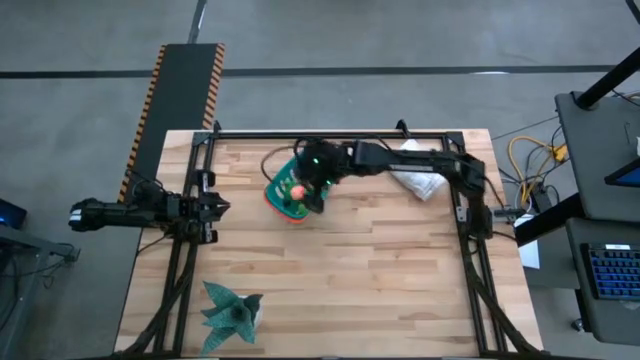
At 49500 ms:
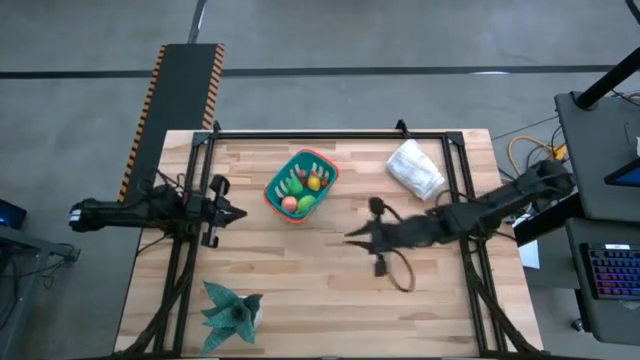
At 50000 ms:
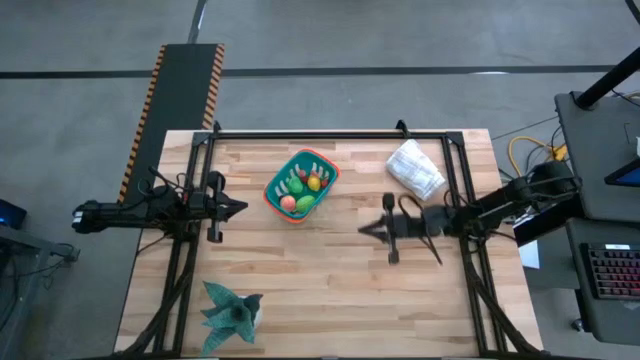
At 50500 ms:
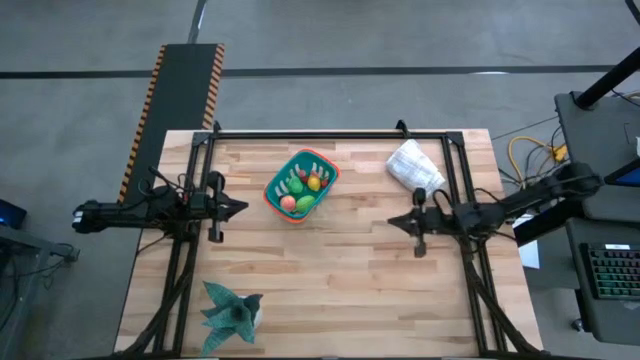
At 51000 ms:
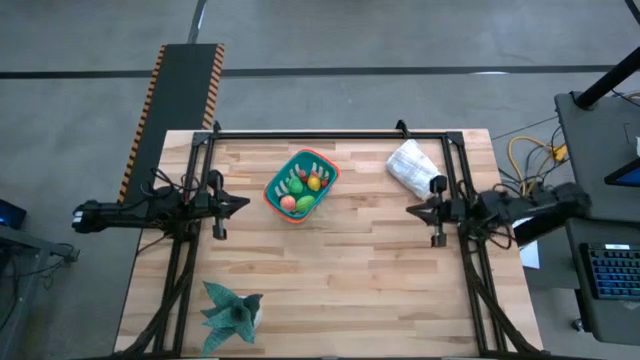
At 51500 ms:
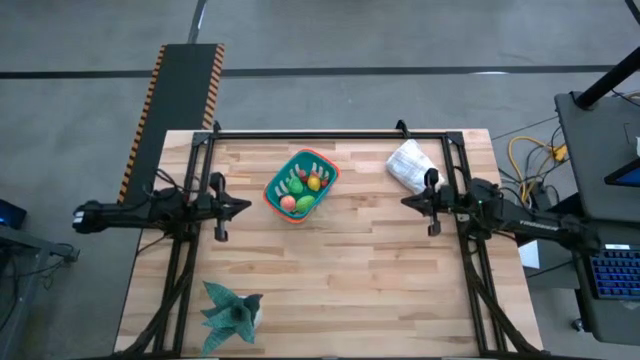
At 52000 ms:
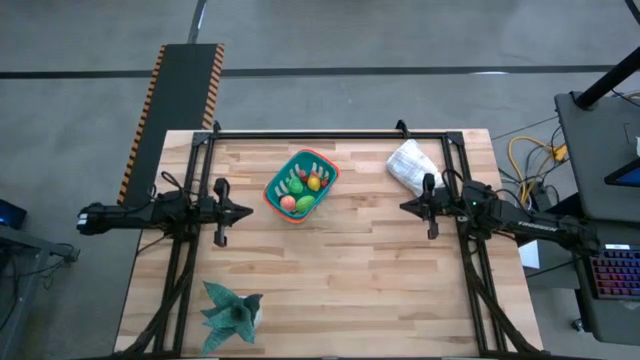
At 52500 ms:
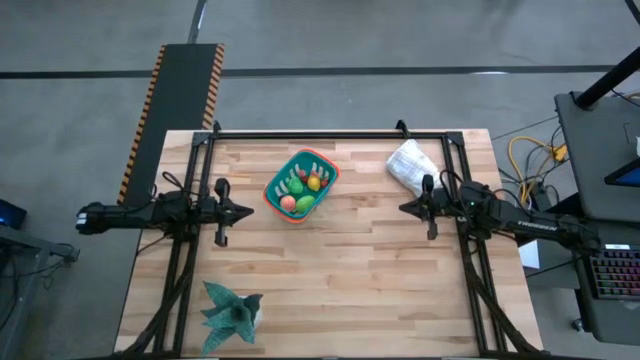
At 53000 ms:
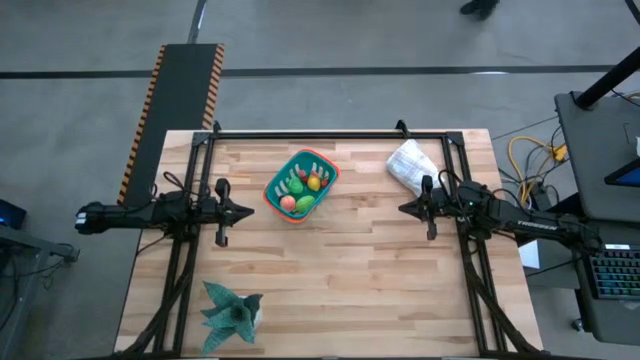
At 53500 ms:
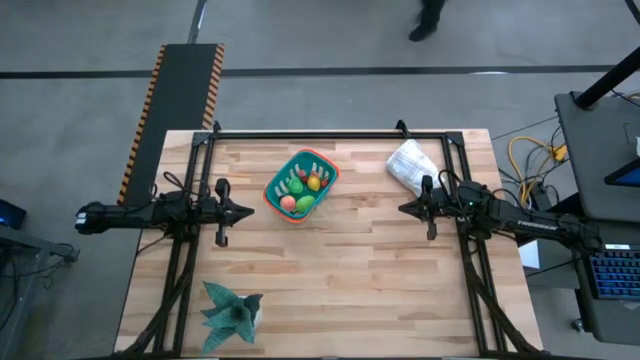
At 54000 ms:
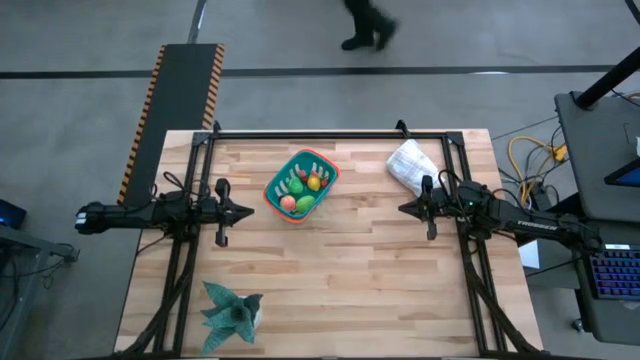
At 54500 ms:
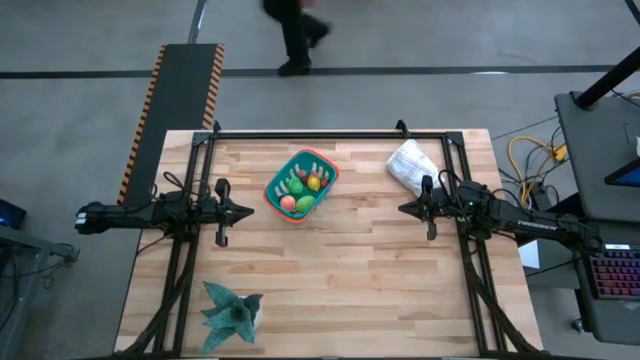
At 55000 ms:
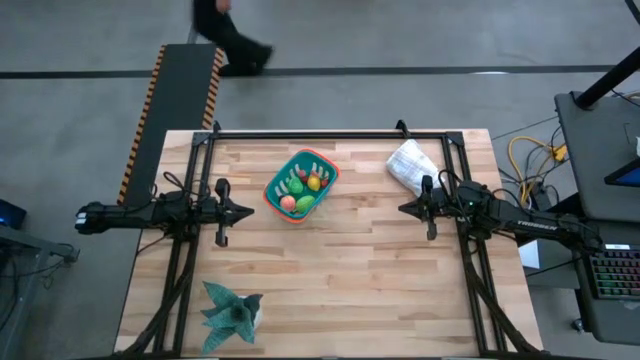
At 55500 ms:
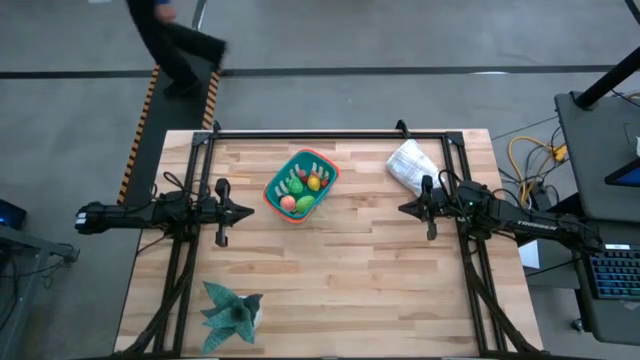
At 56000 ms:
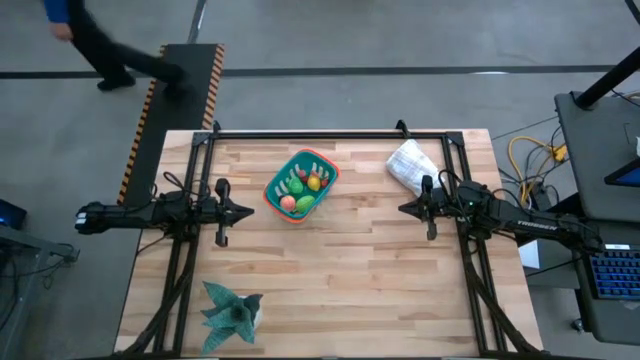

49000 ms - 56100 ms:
Task: Pick and placing Produce into tupperware
Return to Home Position

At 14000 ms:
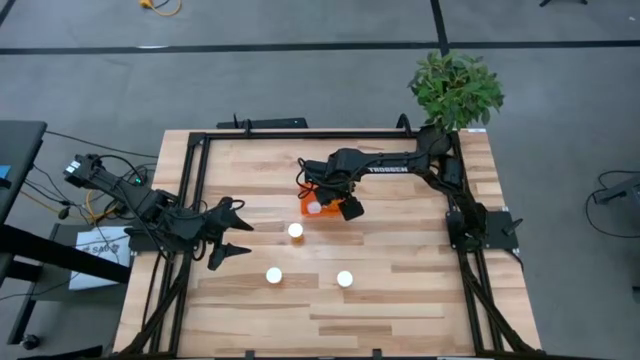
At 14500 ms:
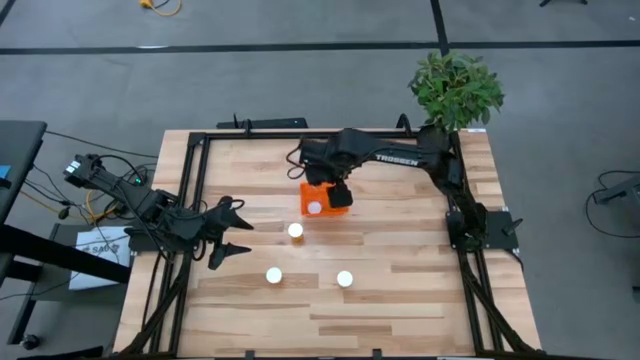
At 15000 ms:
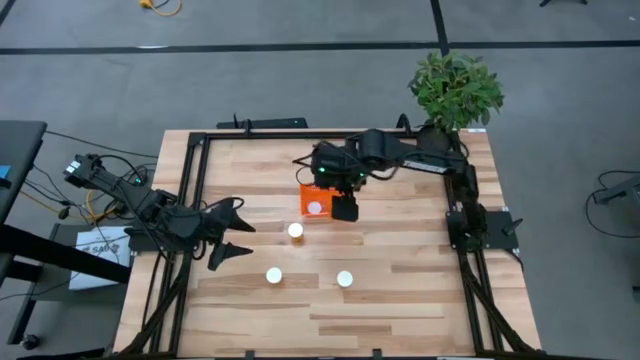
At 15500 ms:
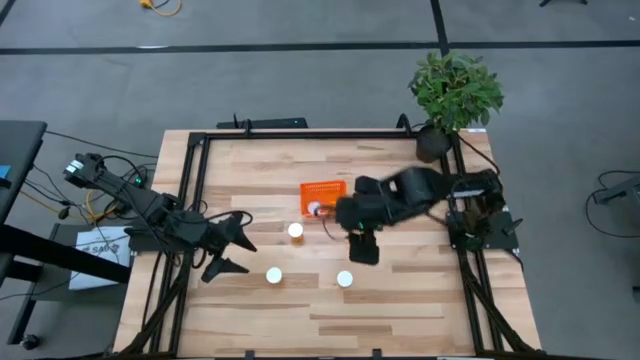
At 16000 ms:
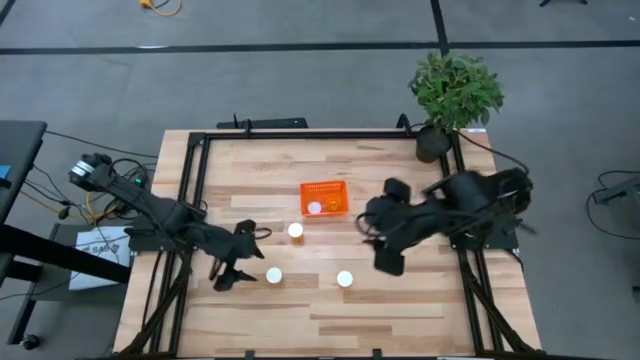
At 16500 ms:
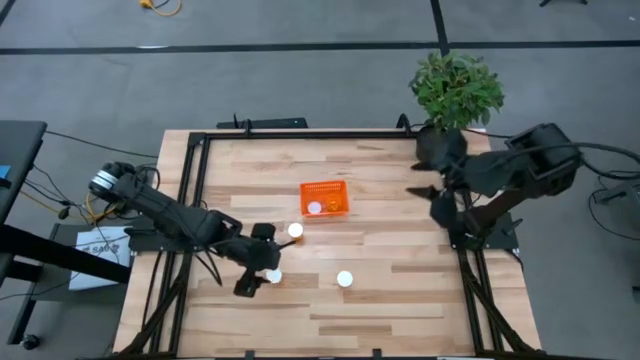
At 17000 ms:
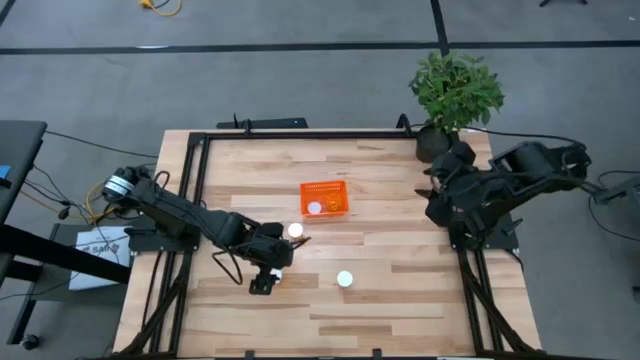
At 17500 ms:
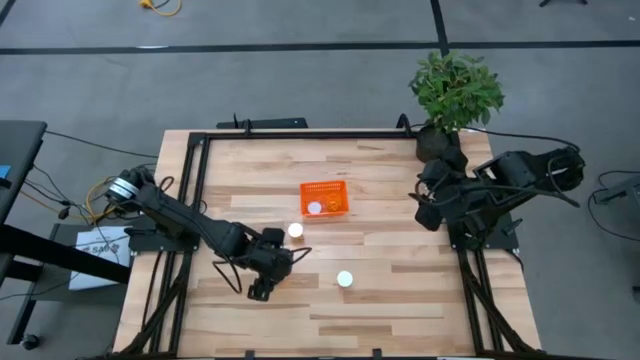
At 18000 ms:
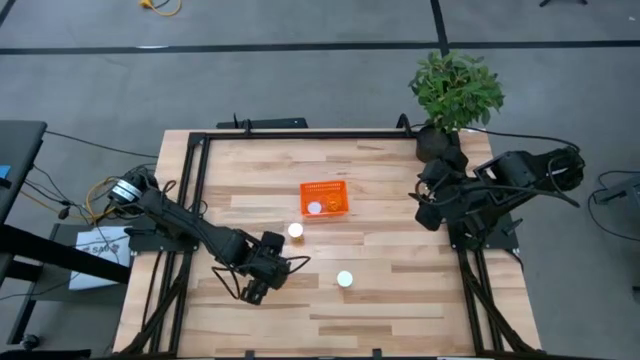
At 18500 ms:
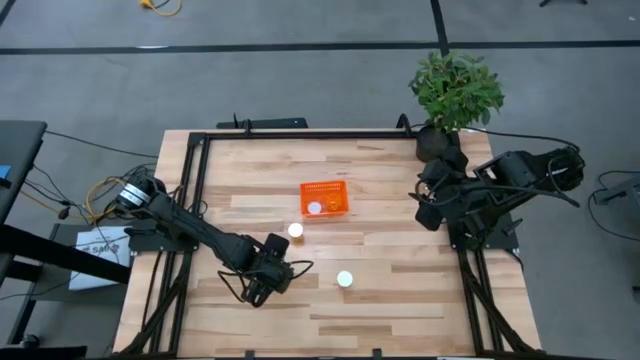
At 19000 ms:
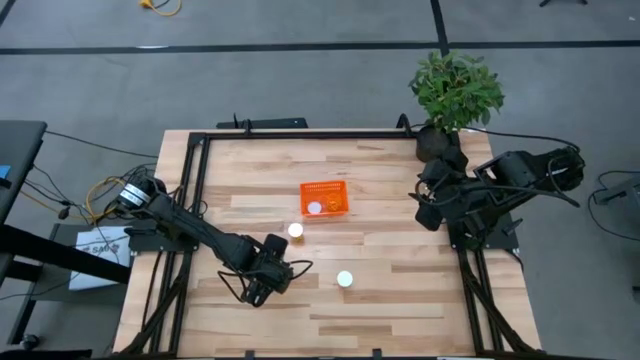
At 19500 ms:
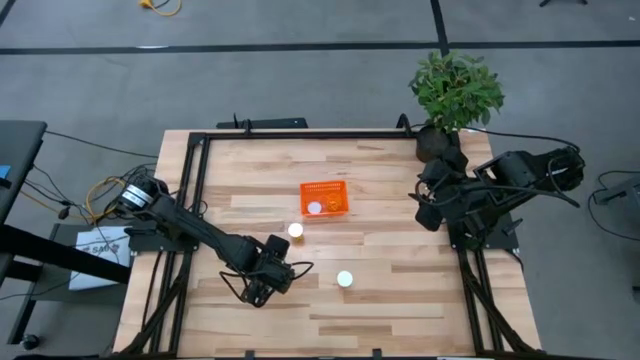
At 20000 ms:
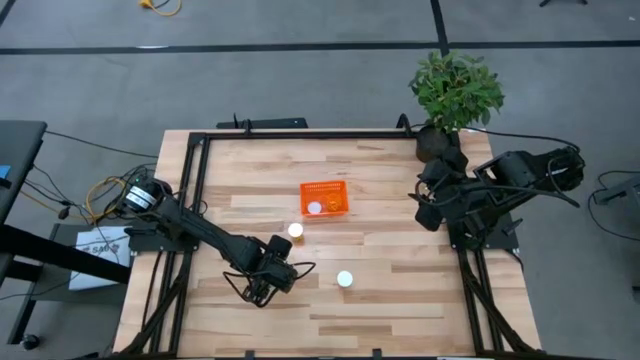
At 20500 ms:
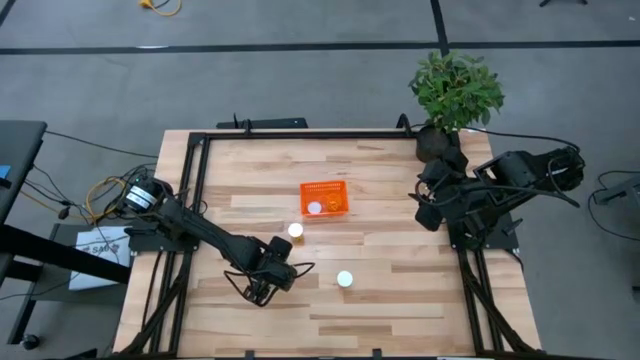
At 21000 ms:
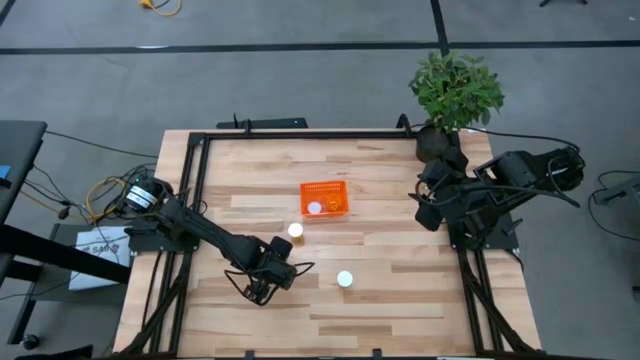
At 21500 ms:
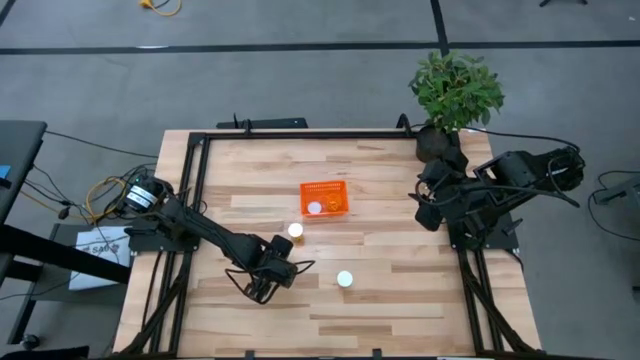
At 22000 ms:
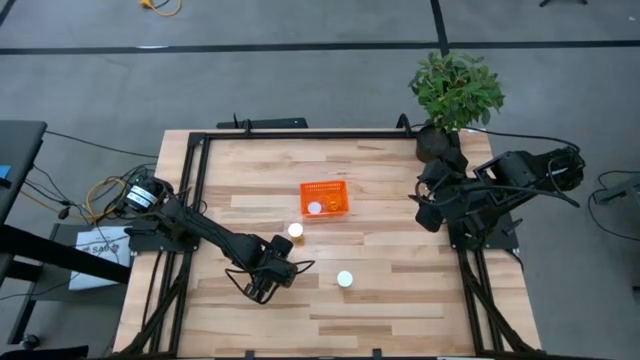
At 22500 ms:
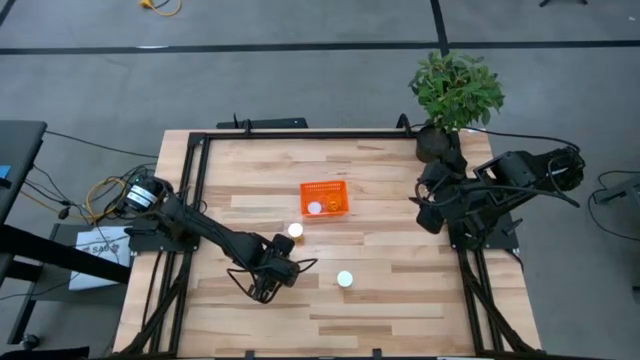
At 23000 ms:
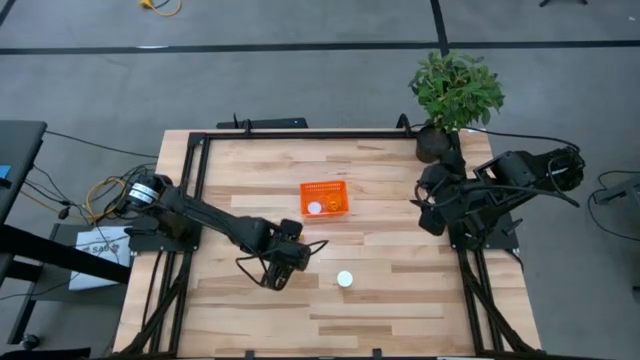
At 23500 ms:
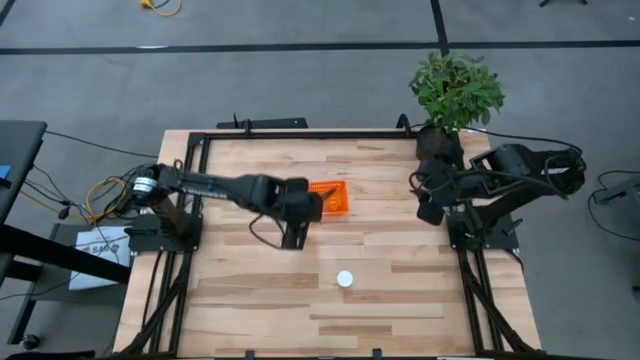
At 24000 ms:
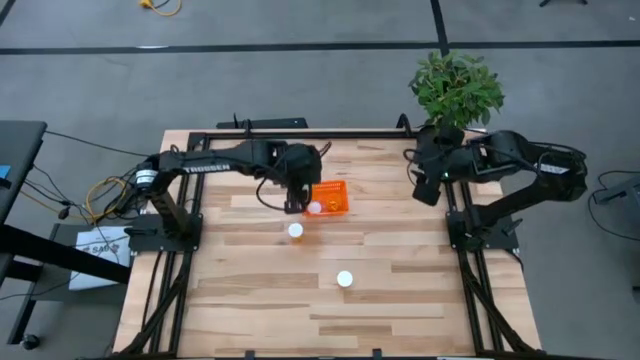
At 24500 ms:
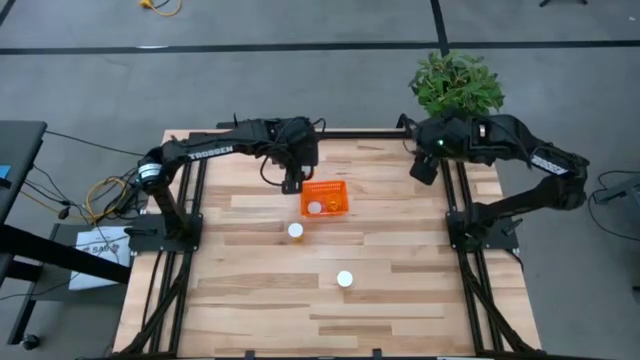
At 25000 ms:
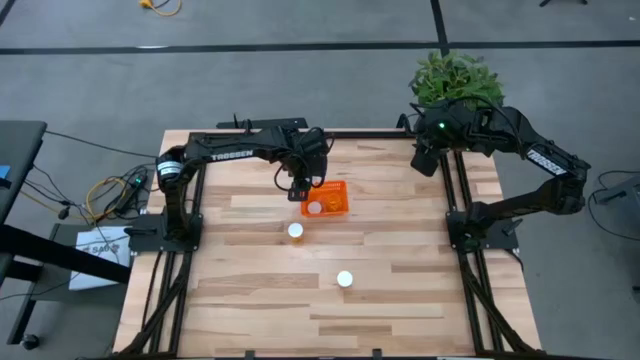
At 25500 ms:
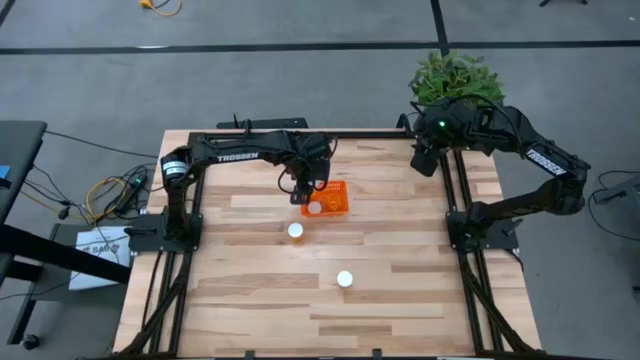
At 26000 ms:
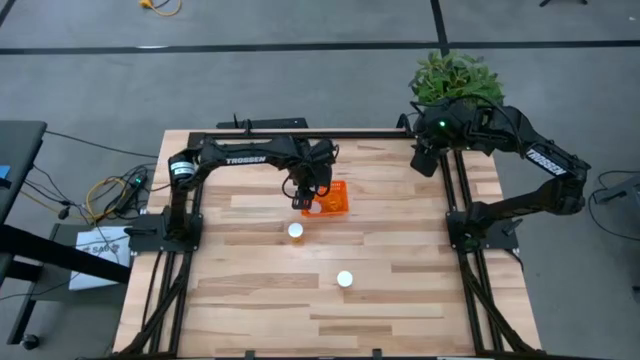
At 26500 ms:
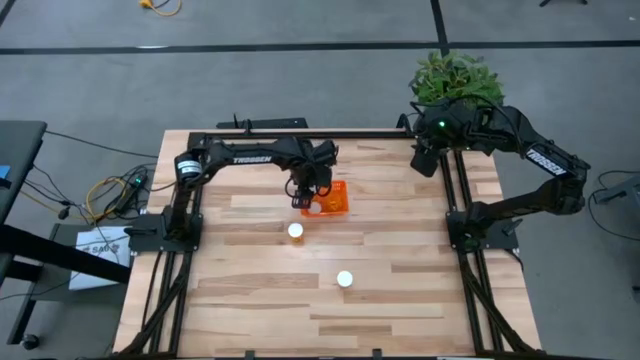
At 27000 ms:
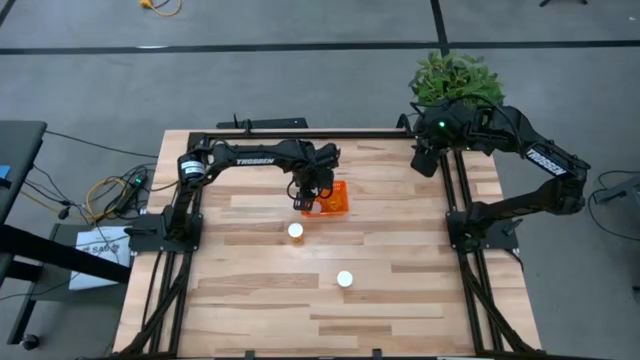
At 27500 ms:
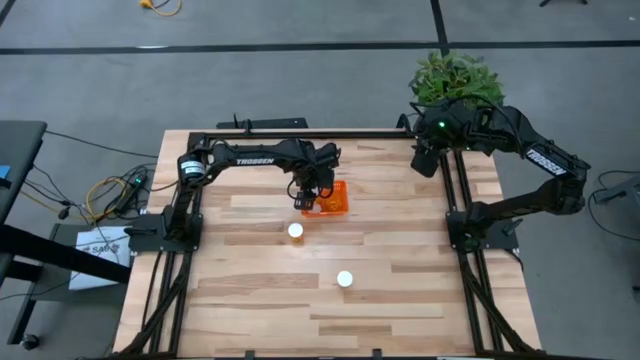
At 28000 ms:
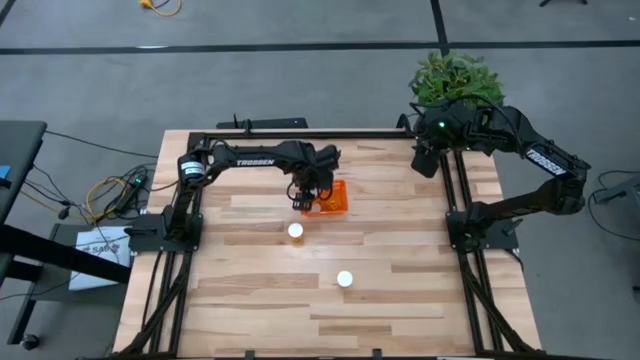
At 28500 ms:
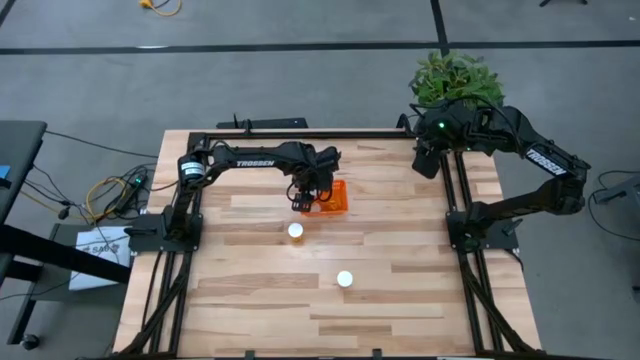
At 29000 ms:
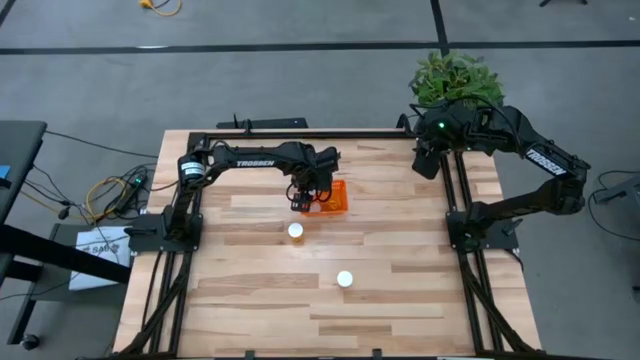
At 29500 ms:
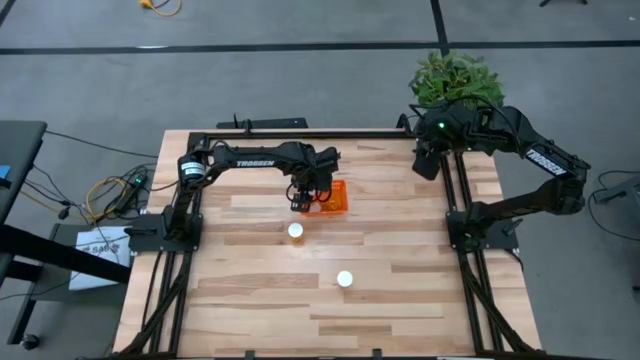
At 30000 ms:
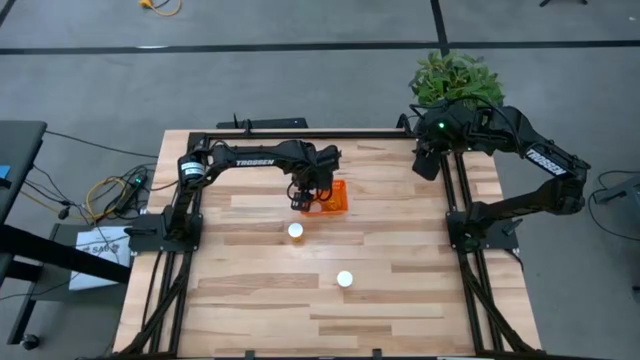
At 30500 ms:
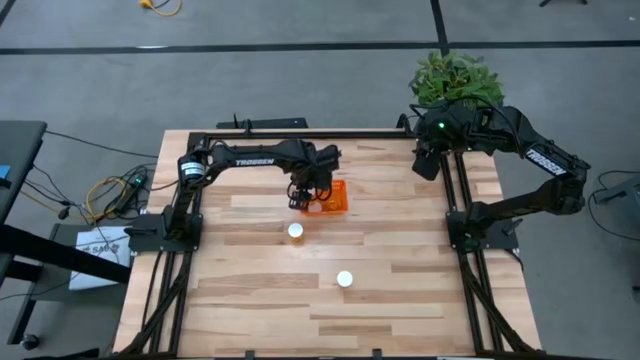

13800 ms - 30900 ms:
Task: Pick and place pill bottles into a basket
Put the orange pill bottle into the orange bin
